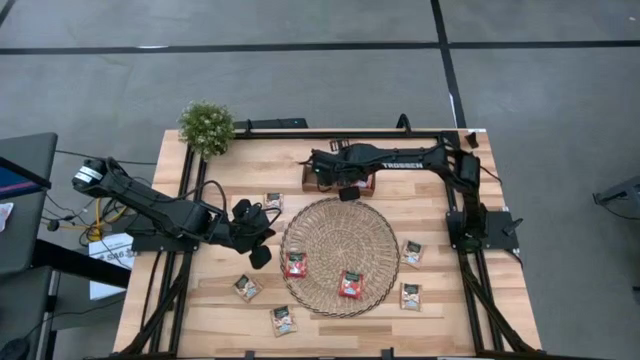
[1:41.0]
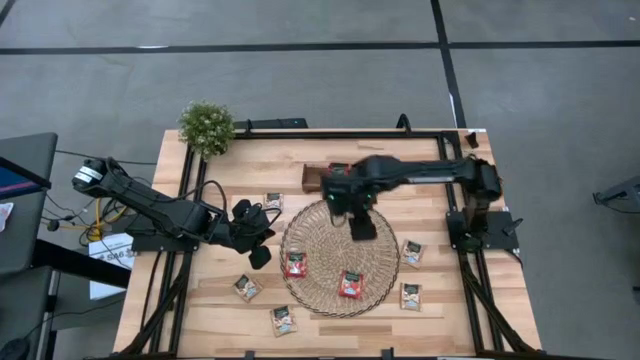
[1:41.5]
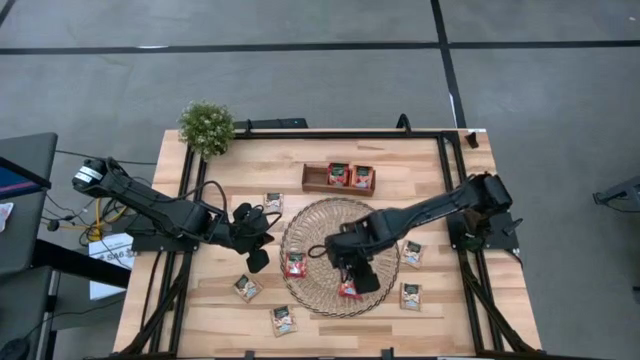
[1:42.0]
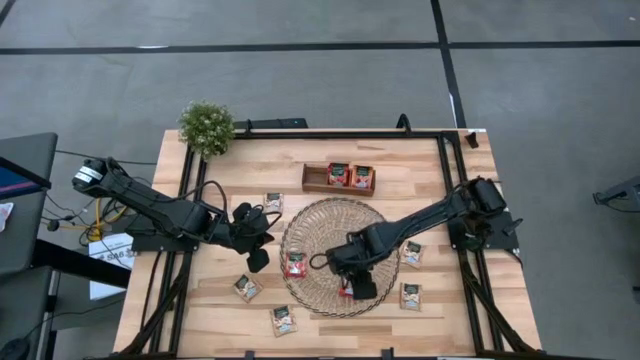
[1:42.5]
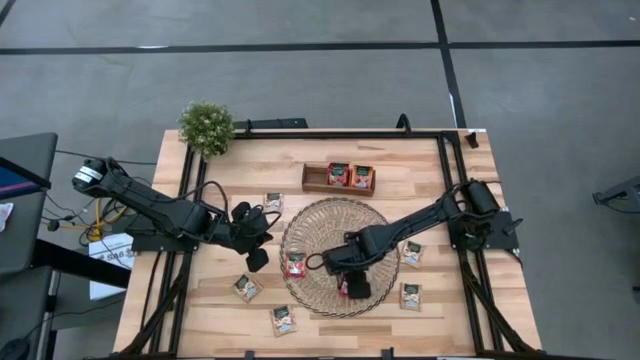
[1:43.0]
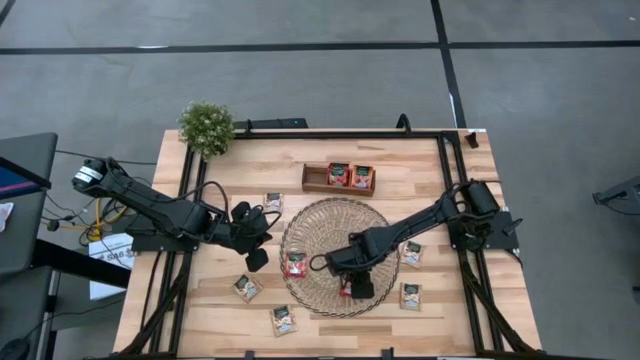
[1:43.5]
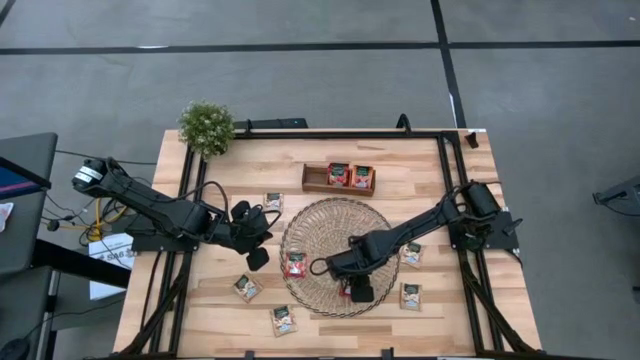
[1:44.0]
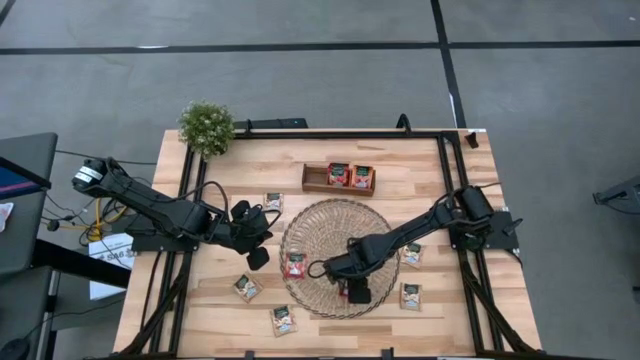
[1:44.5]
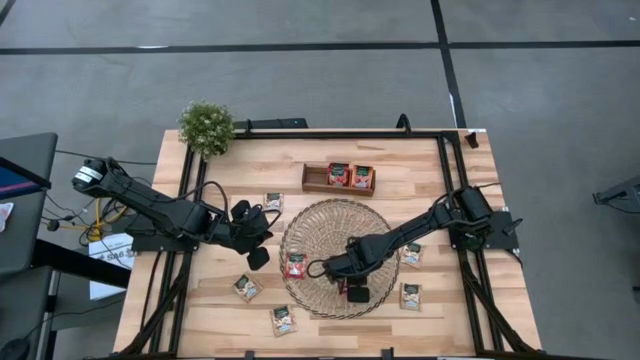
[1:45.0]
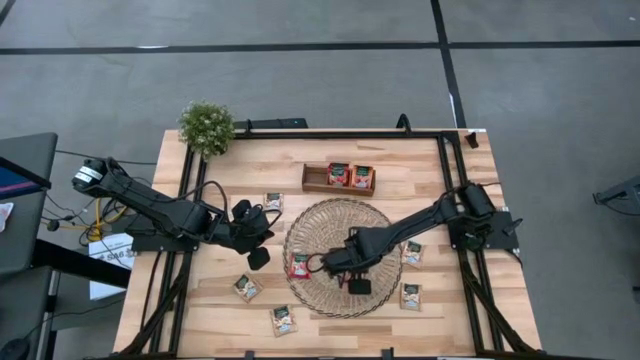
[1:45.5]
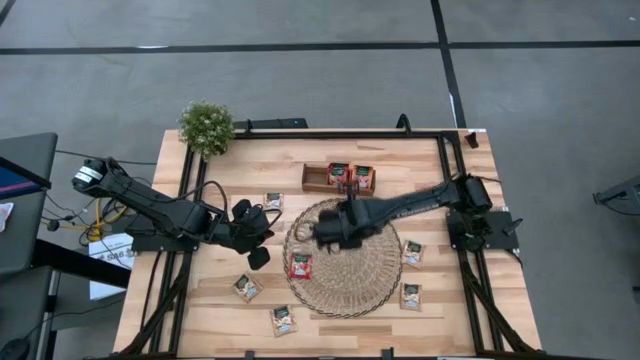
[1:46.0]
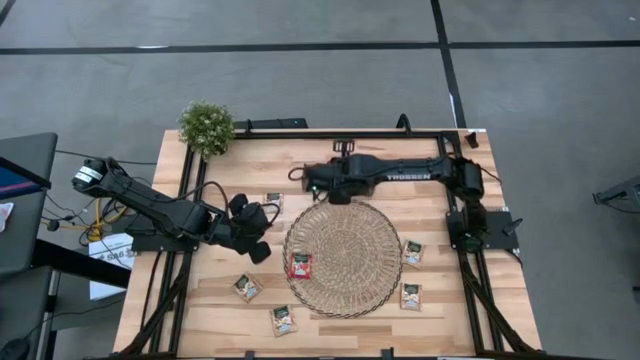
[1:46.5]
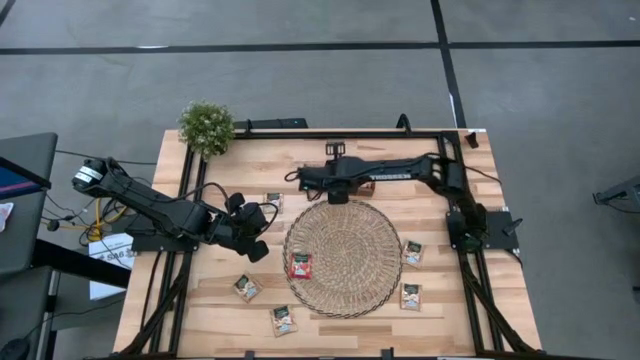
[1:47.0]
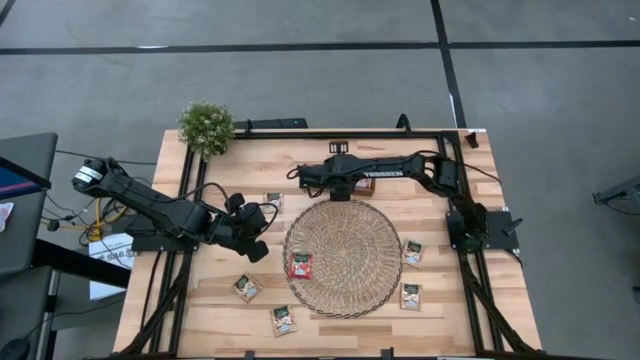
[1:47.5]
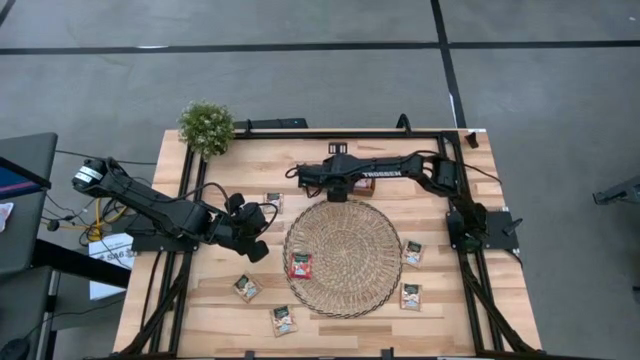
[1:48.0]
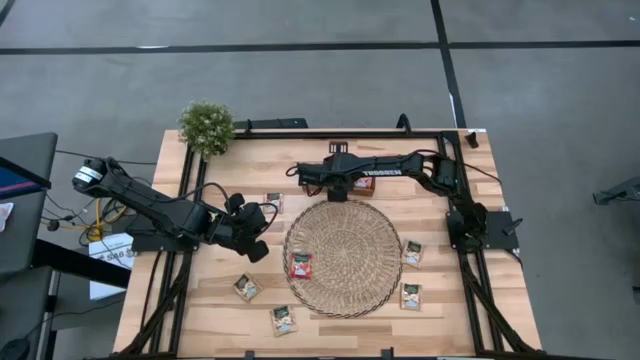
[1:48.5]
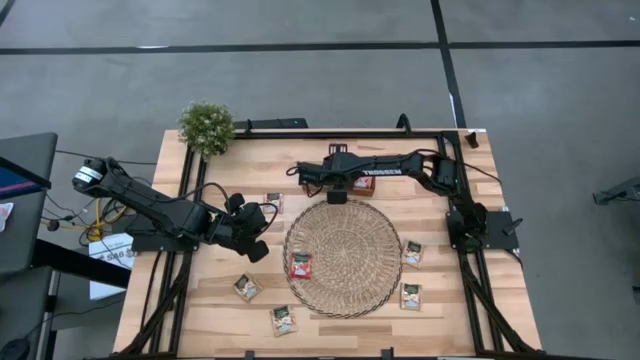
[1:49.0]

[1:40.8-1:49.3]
Task: Pick & Place Tea
Put the red tea bag into the middle section of the wooden organizer

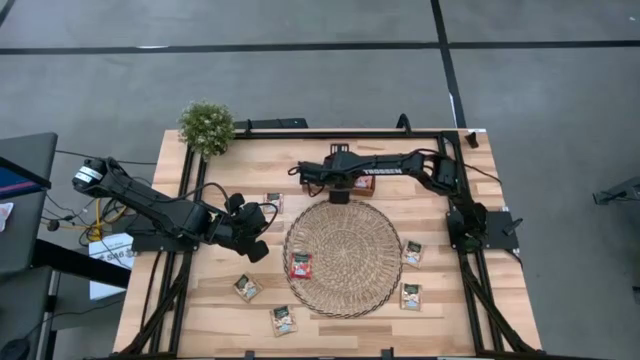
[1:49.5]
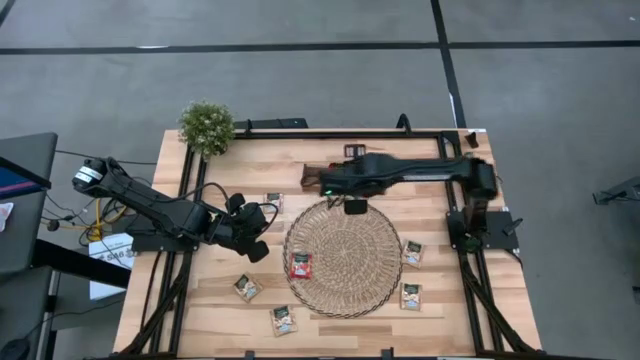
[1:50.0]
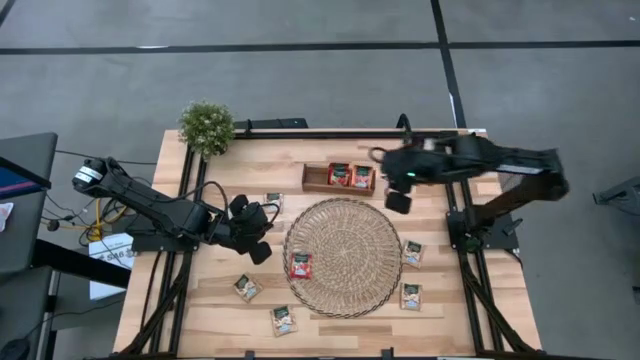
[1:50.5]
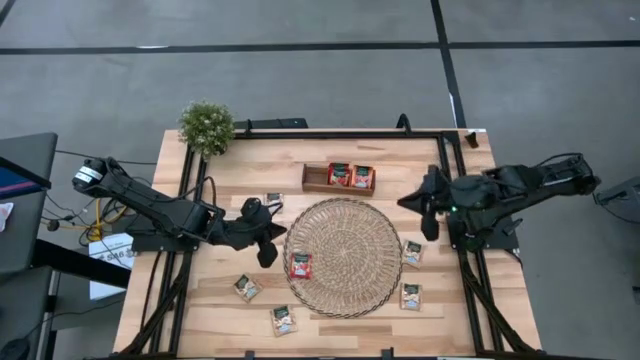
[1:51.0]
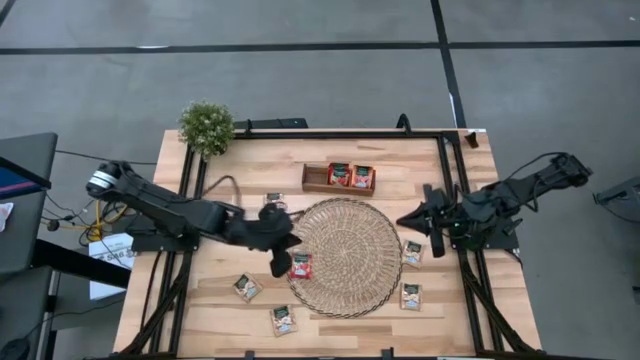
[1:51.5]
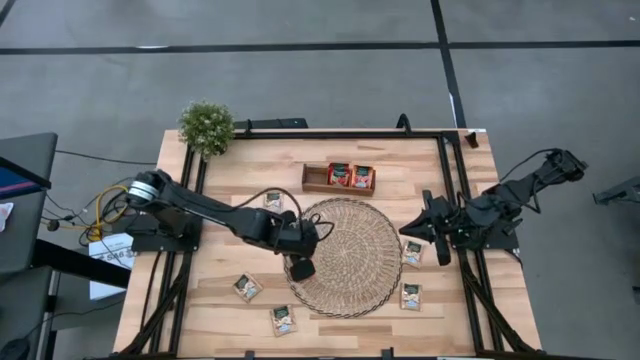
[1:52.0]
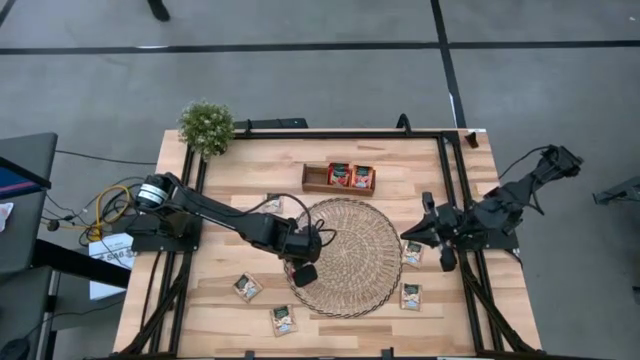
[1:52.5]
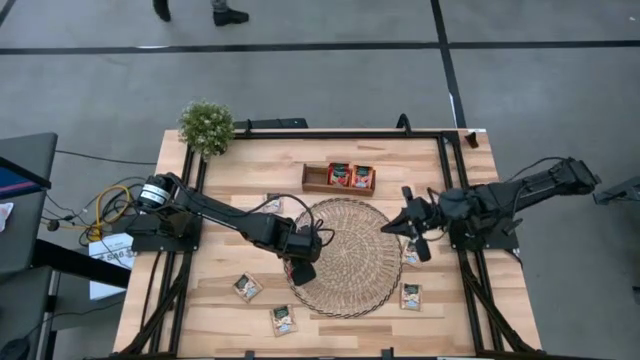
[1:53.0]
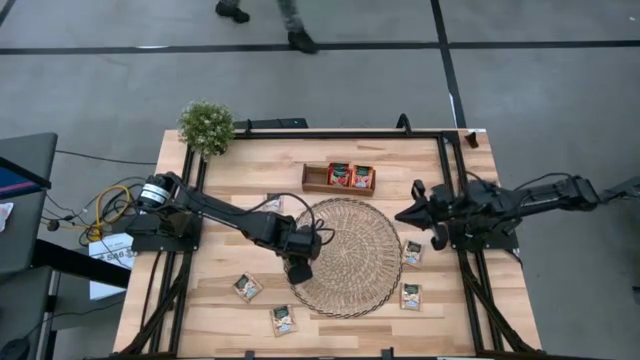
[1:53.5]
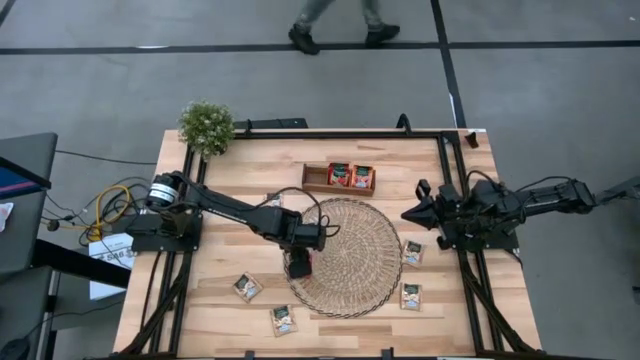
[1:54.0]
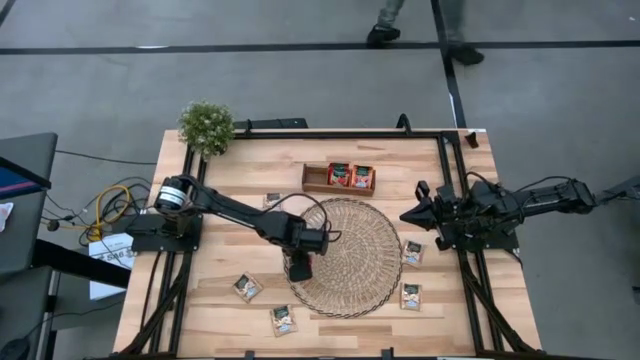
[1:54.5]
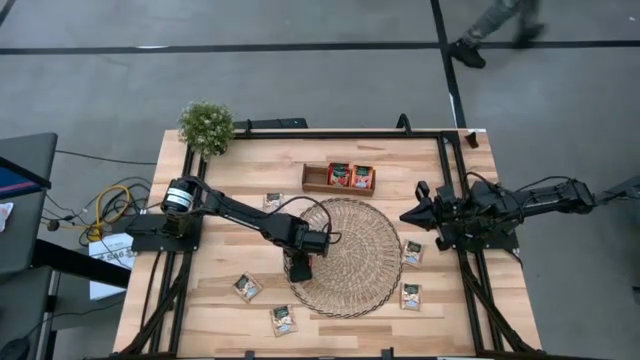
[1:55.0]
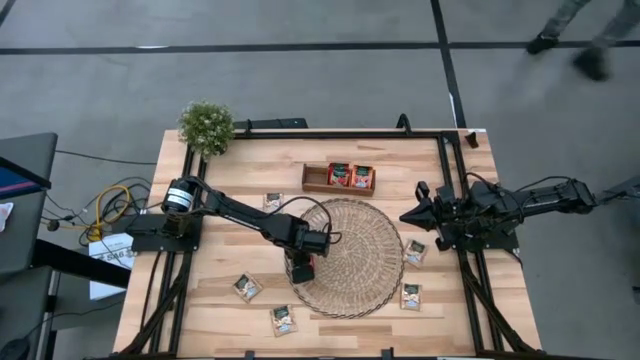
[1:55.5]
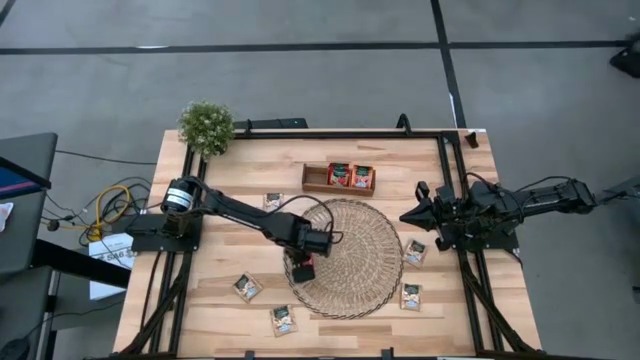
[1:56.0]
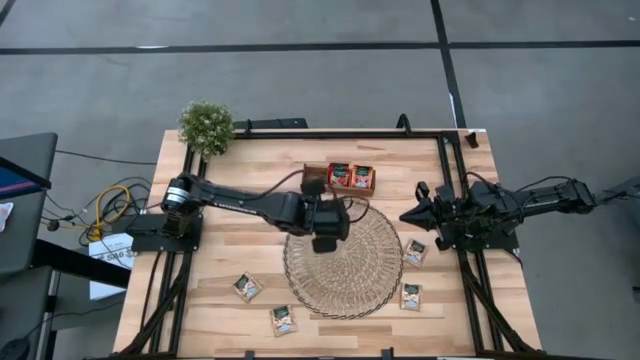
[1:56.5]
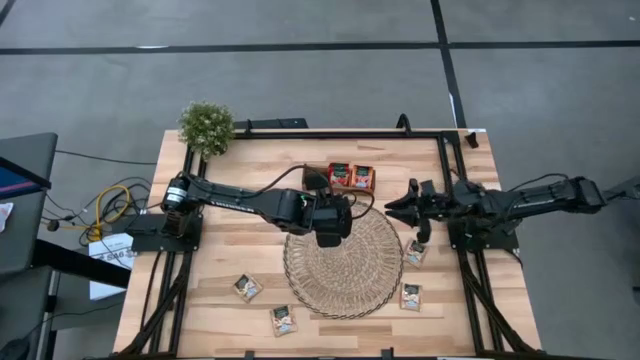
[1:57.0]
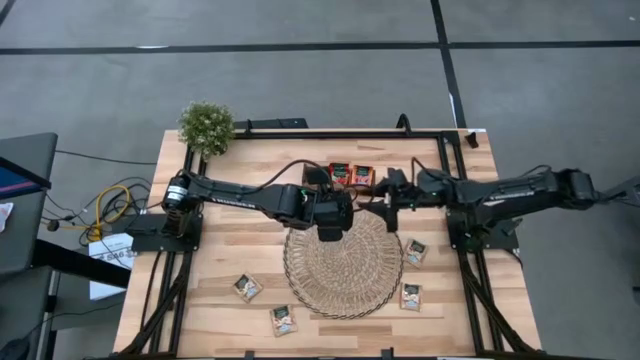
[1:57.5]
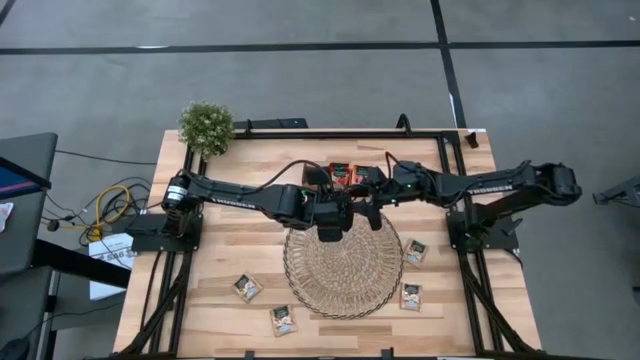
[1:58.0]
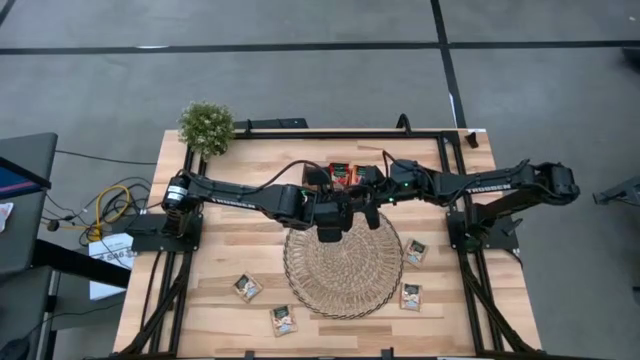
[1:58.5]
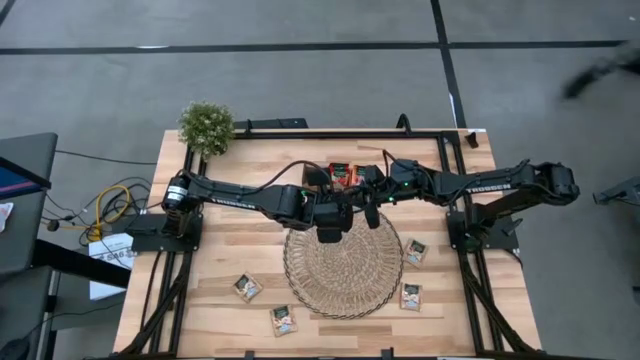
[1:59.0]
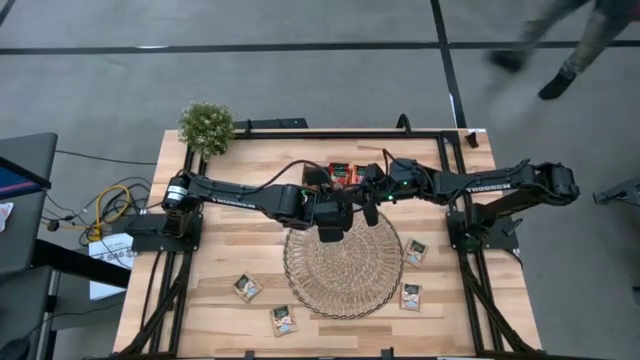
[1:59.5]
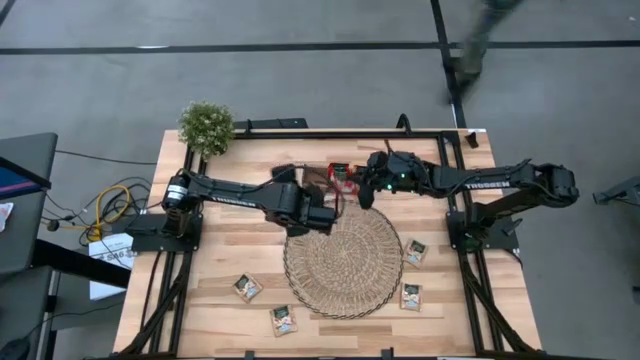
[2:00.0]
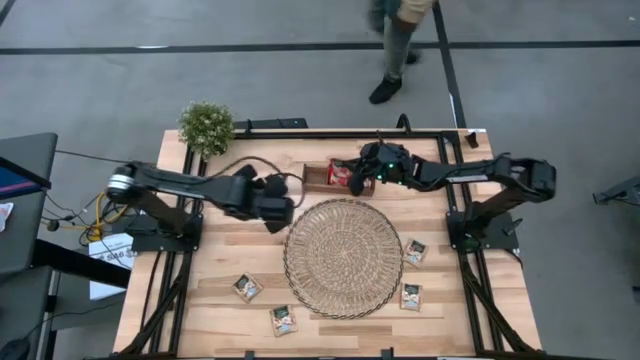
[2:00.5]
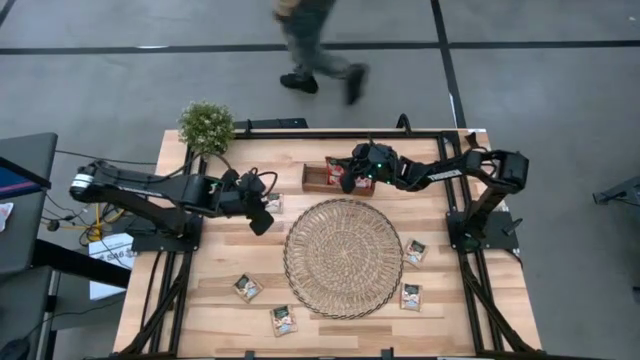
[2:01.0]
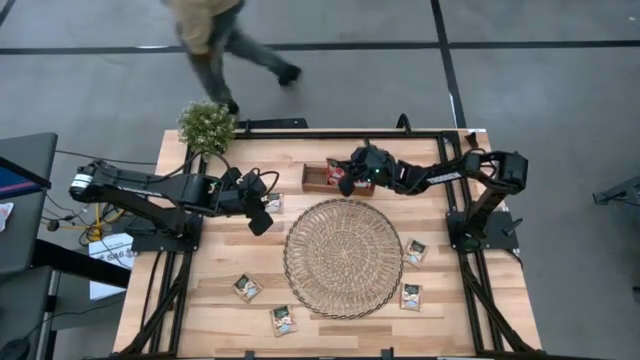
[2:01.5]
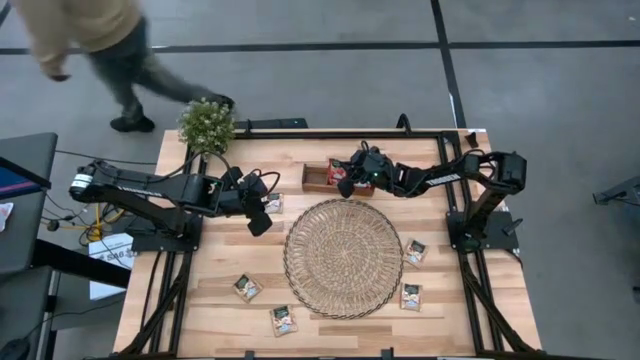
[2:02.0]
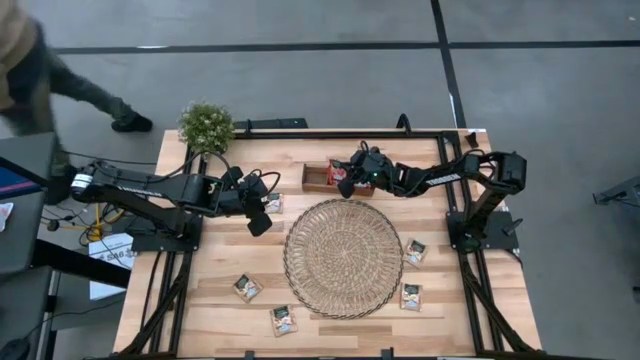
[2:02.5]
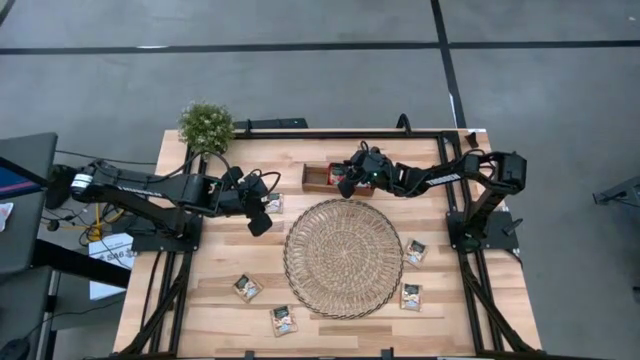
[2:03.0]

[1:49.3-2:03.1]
Put the red tea bag into the middle section of the wooden organizer
